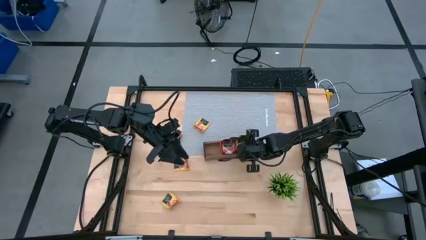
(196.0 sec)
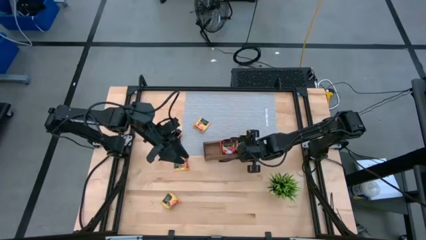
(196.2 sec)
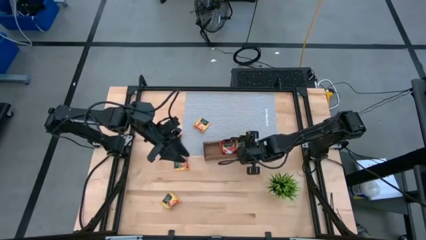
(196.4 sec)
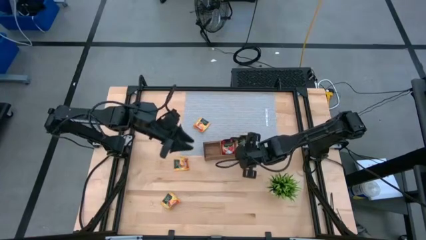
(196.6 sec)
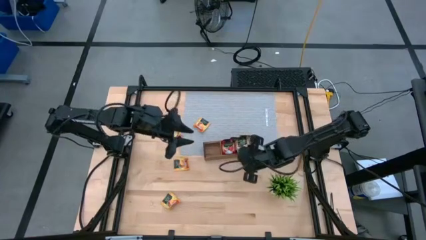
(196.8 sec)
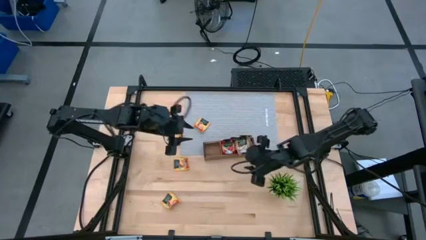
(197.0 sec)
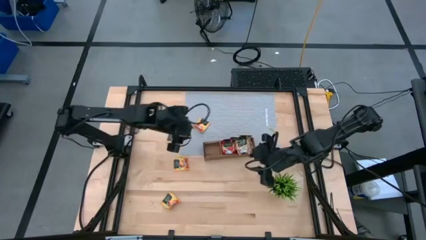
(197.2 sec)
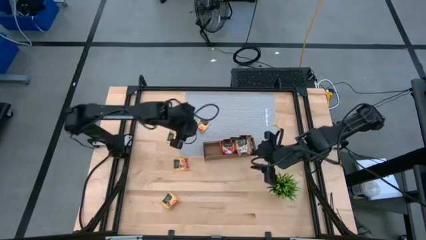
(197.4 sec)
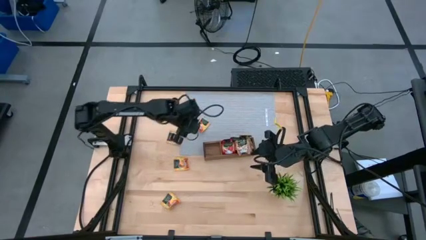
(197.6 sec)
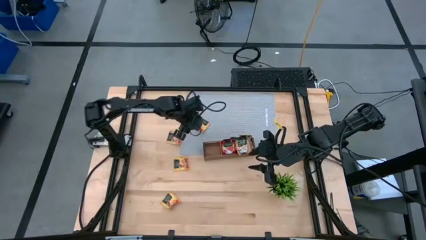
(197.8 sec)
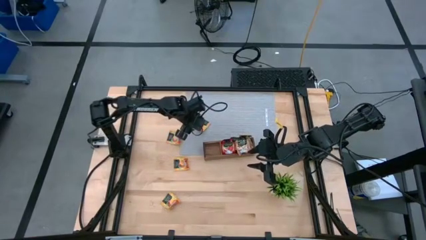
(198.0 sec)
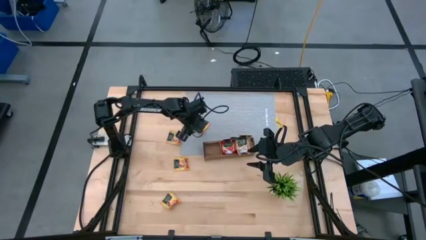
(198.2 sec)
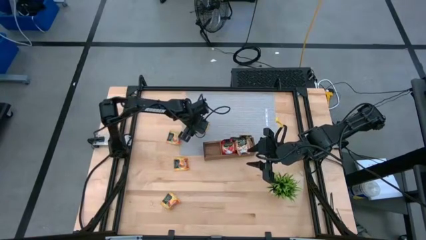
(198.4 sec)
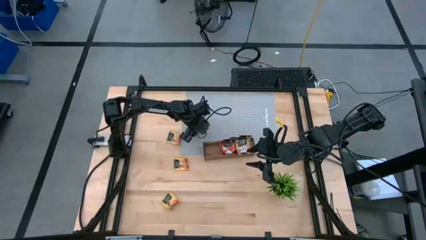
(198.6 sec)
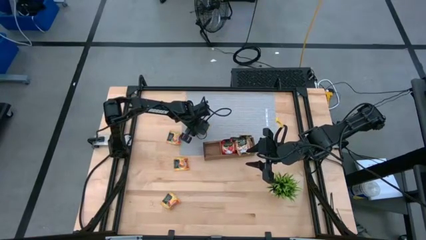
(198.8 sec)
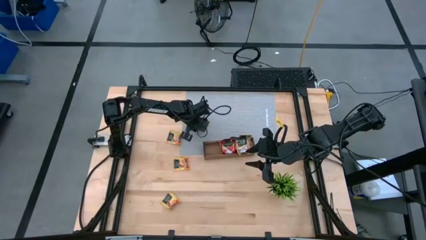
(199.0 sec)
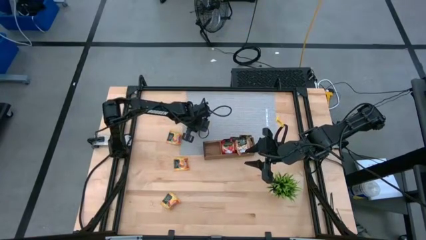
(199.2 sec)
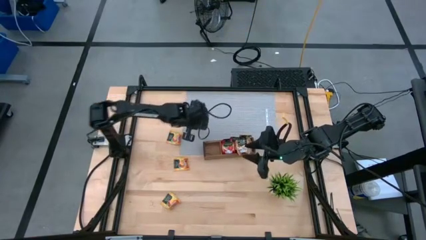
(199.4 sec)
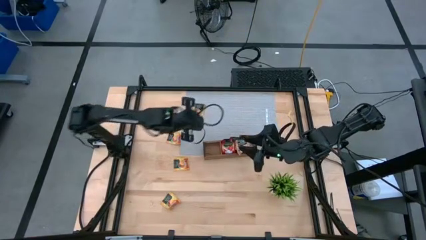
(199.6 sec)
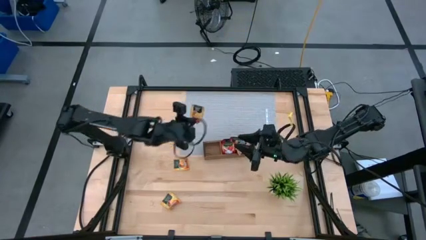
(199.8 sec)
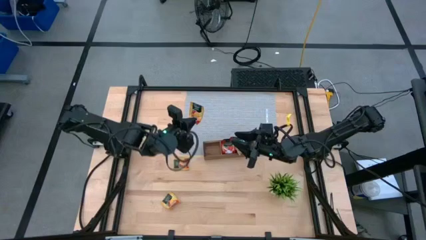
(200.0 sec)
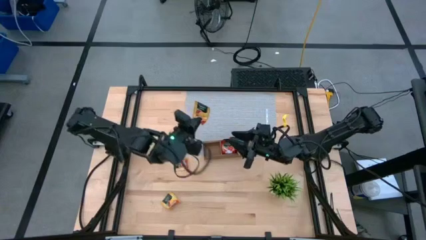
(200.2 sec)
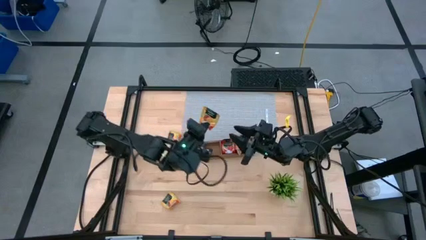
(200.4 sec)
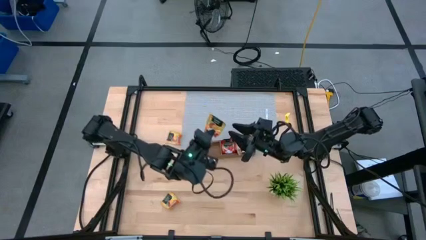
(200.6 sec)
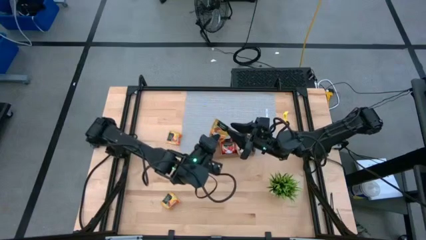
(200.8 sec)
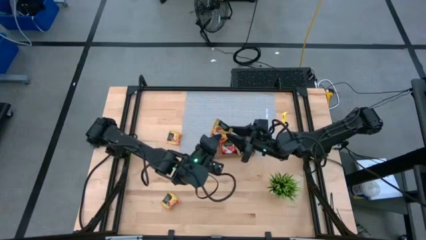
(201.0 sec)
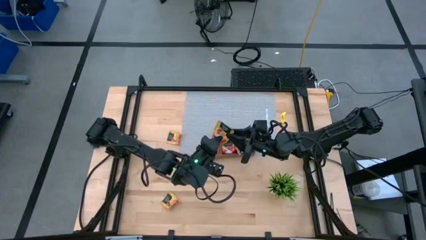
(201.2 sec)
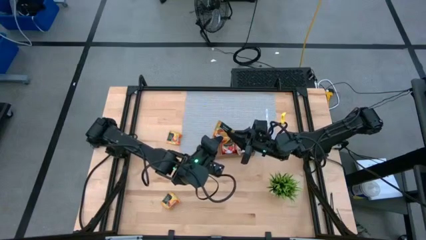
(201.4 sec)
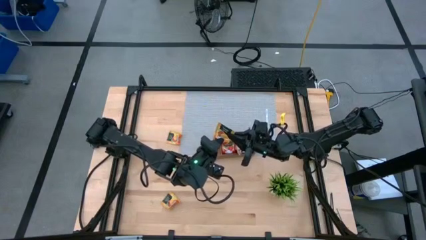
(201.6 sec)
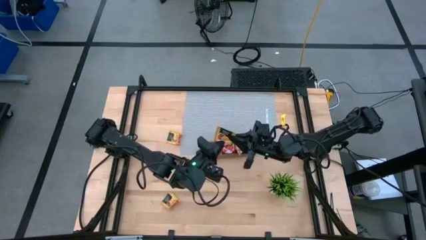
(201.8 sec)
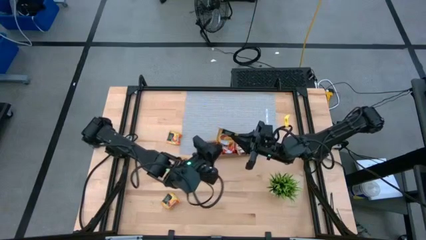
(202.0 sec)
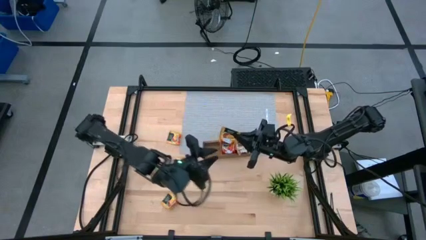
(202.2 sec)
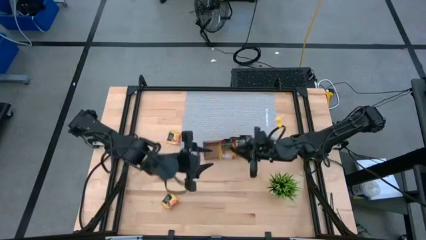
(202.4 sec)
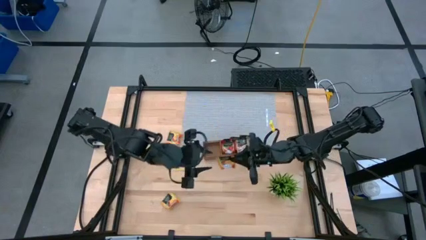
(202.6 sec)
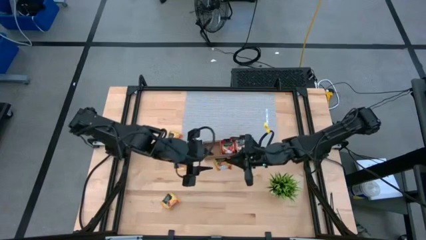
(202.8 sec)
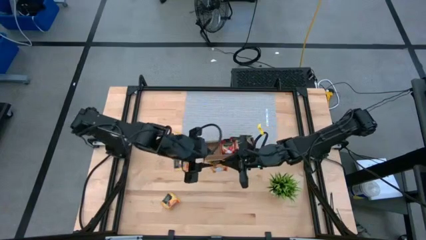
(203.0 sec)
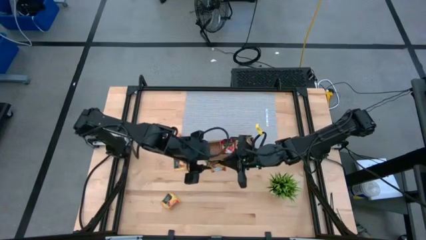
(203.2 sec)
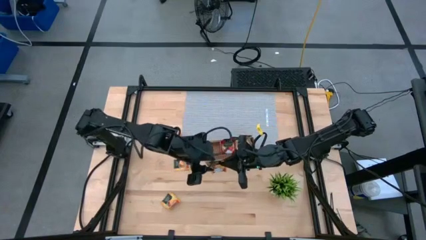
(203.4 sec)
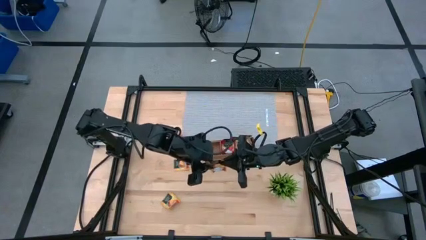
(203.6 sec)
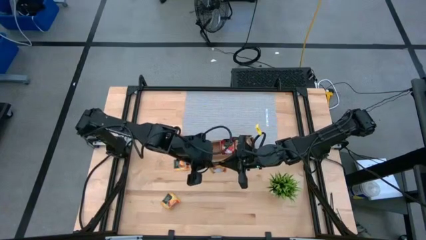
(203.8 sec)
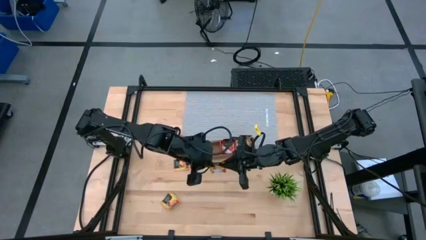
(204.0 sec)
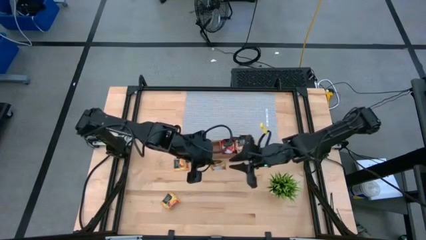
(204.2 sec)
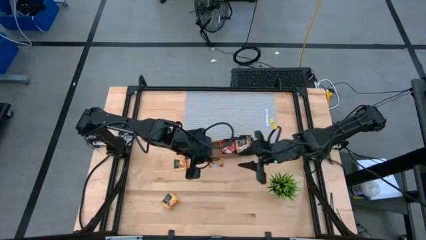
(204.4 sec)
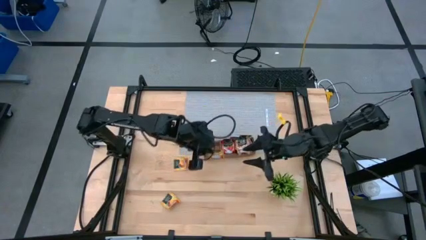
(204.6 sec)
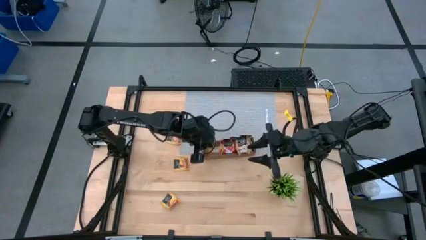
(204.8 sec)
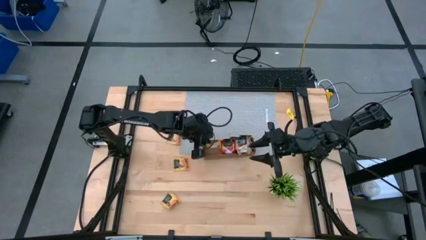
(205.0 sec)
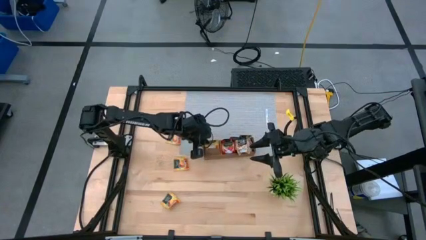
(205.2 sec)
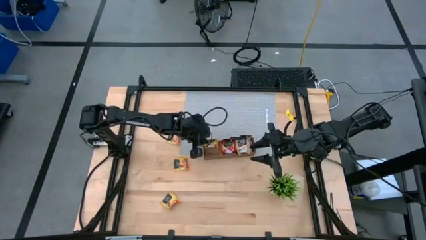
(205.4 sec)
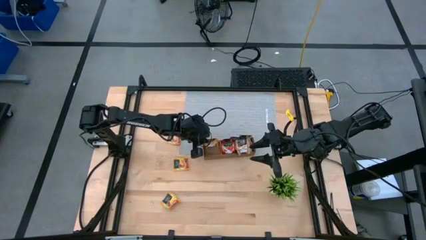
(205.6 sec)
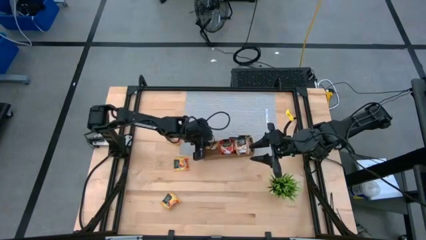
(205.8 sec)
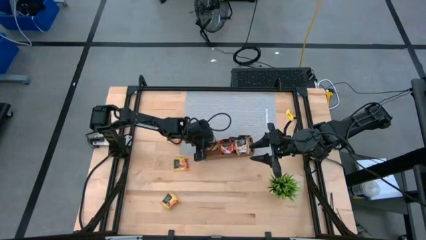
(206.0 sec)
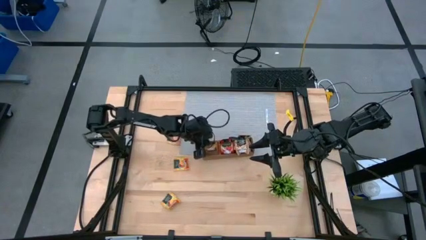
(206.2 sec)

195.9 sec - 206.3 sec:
Task: Pick & Place Tea
Put the yellow tea bag into the left section of the wooden organizer
